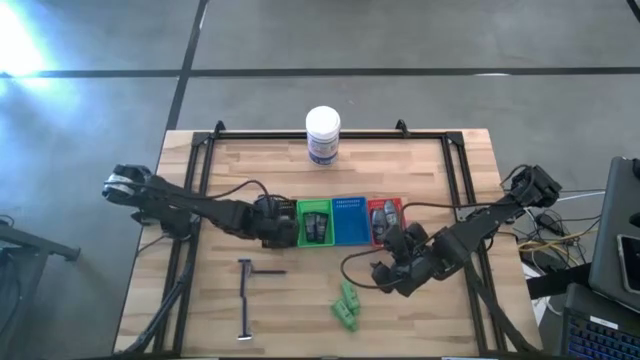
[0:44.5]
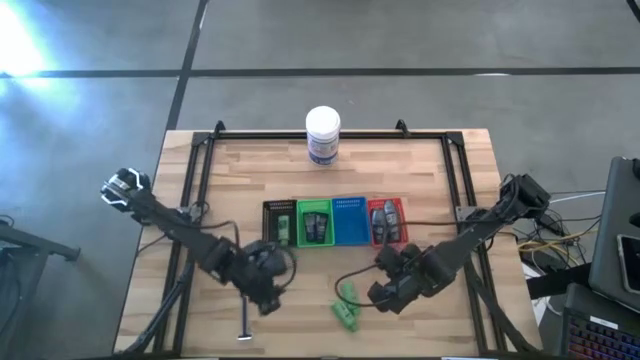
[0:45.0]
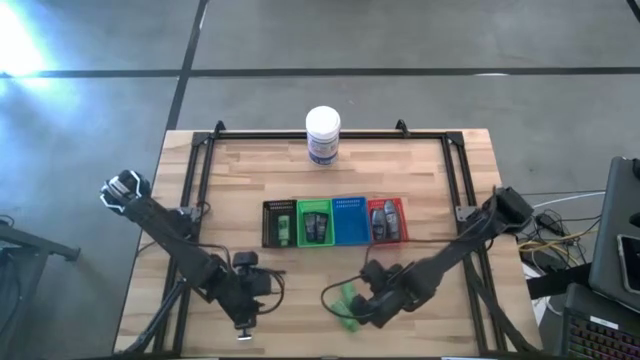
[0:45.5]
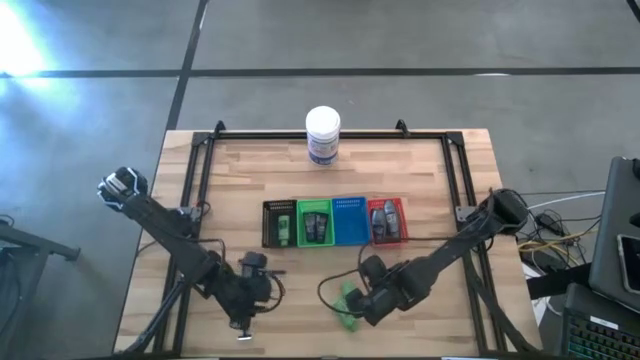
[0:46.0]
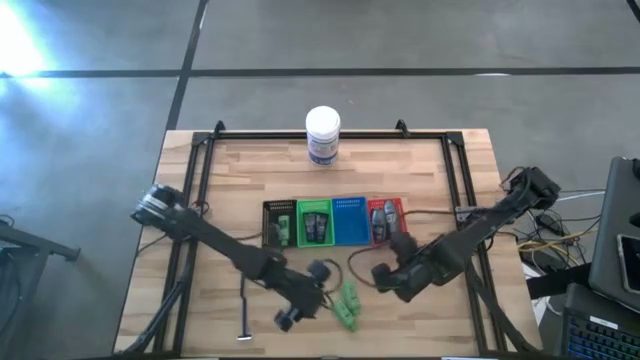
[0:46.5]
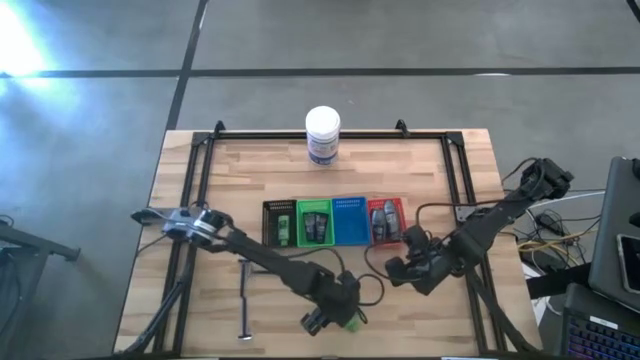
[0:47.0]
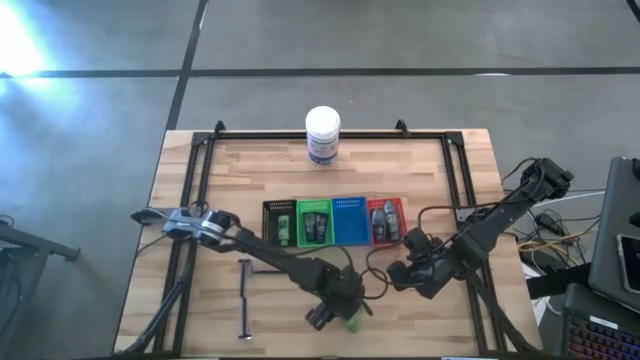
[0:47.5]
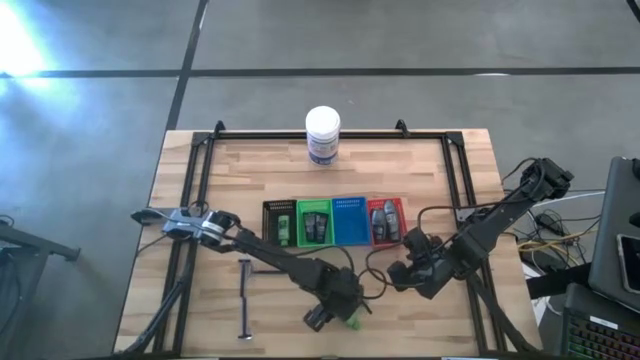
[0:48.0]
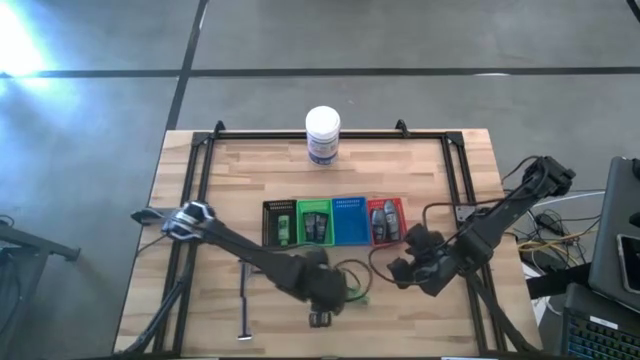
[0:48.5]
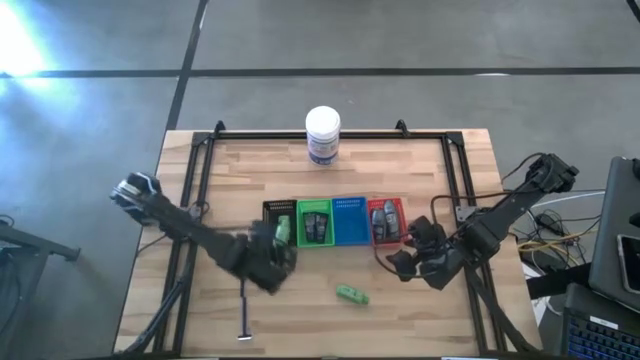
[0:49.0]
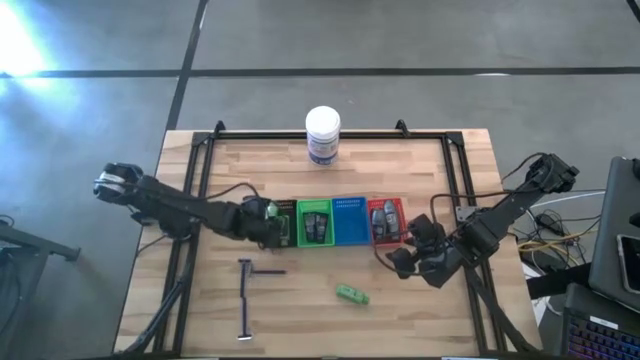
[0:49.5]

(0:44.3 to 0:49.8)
Task: Pick & Place Travel size toiletries
Put the green shampoo in the black bin

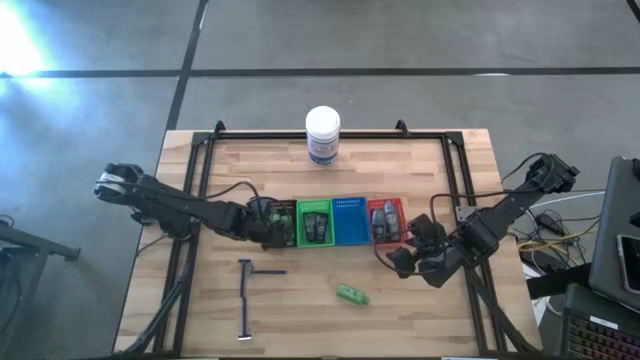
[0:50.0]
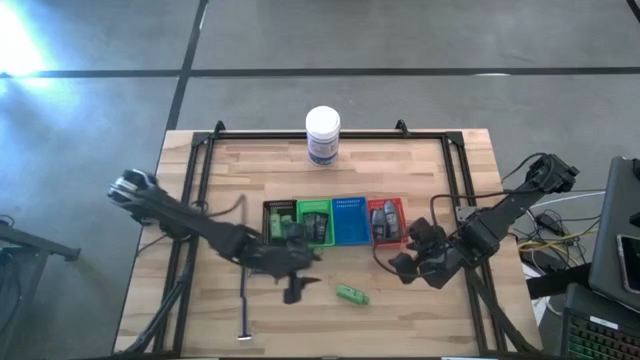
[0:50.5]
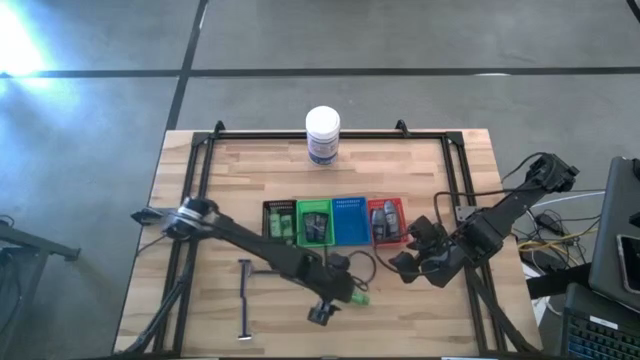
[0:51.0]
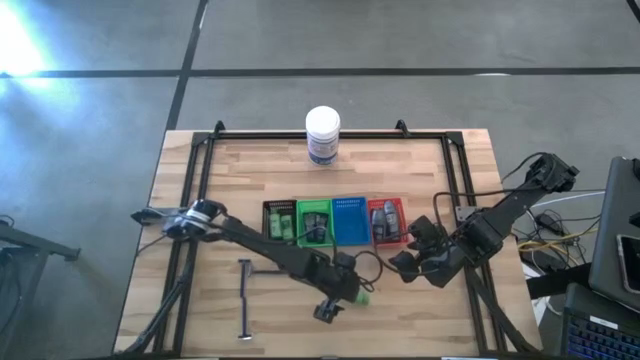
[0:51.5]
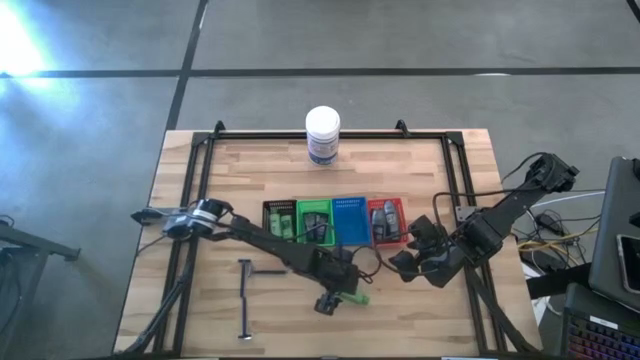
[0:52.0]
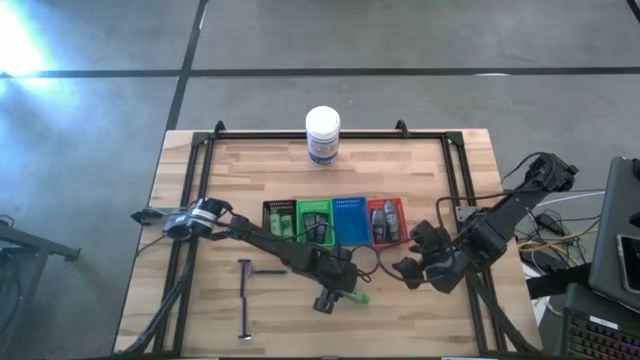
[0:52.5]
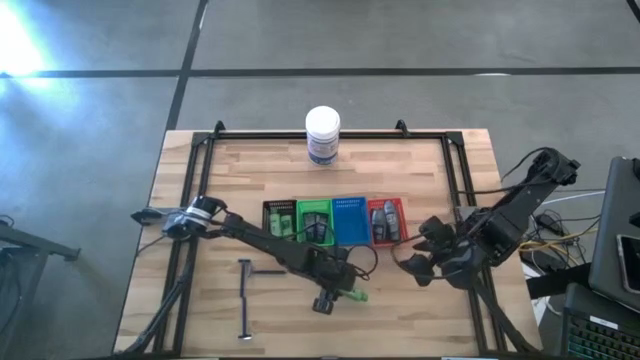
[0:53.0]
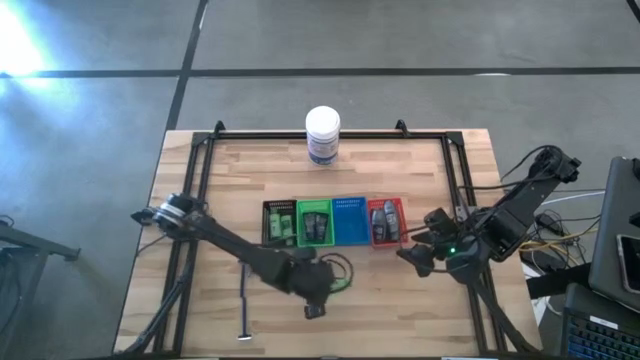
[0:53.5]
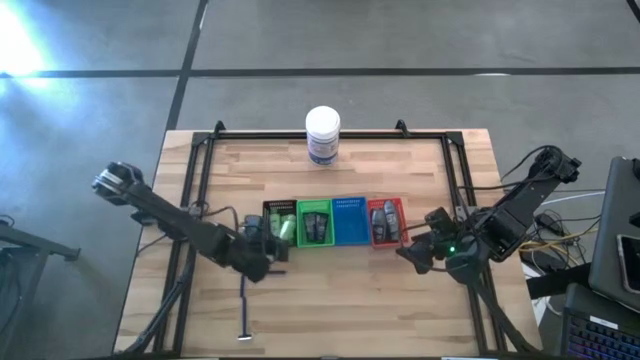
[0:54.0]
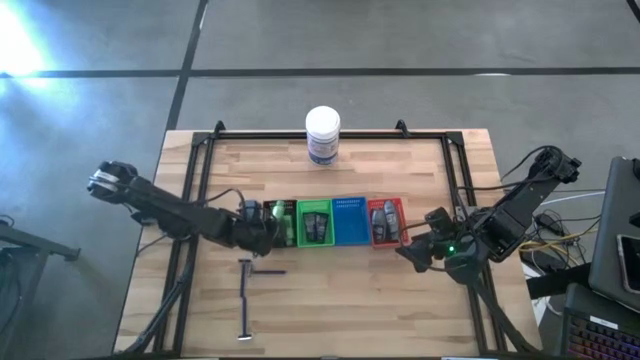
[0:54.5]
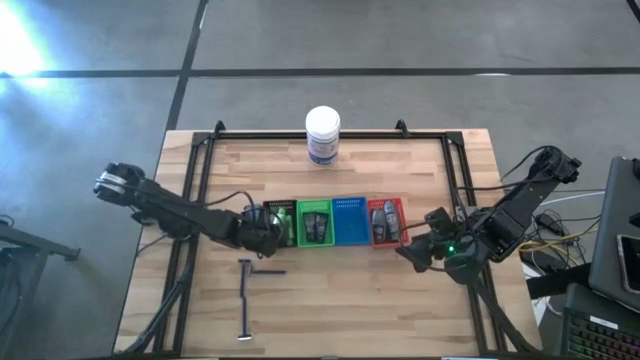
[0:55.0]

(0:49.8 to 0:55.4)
Put the green shampoo in the black bin

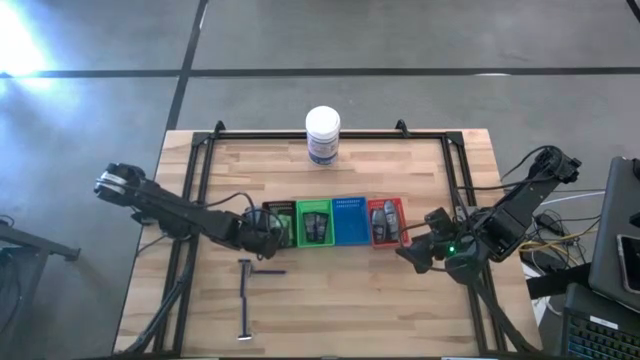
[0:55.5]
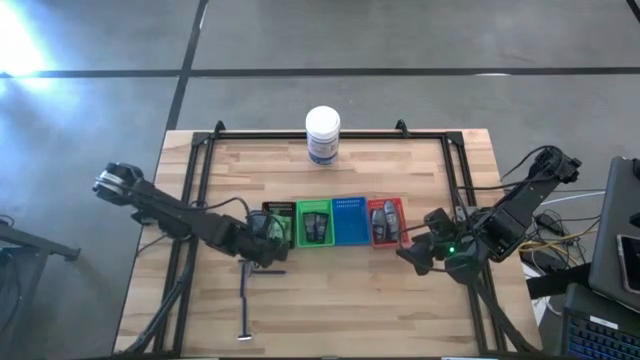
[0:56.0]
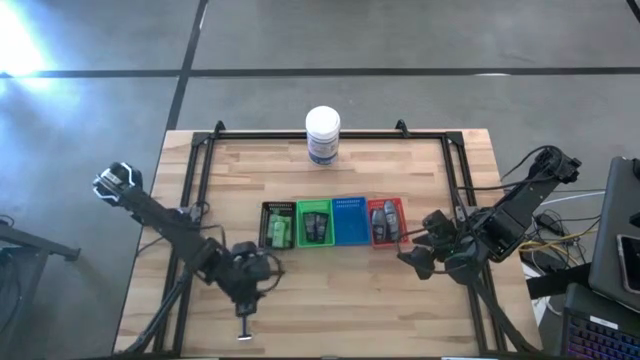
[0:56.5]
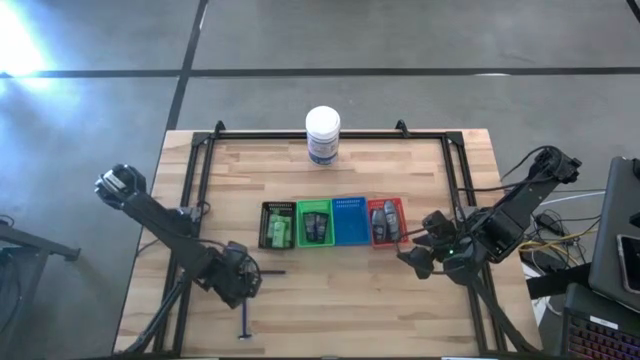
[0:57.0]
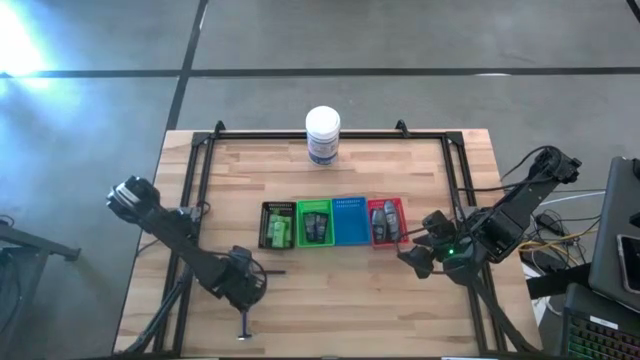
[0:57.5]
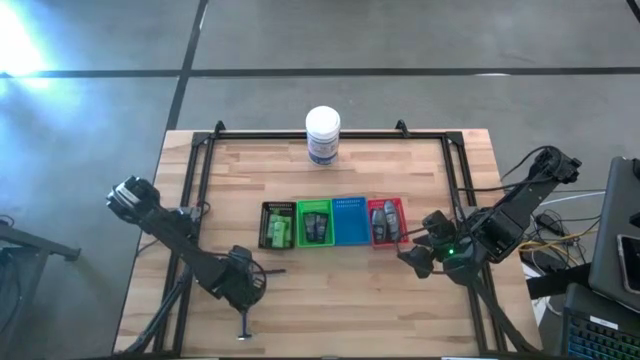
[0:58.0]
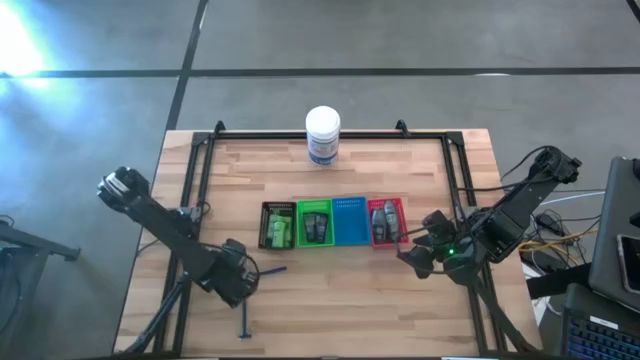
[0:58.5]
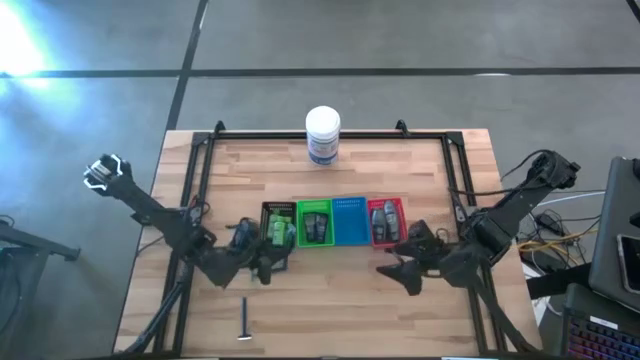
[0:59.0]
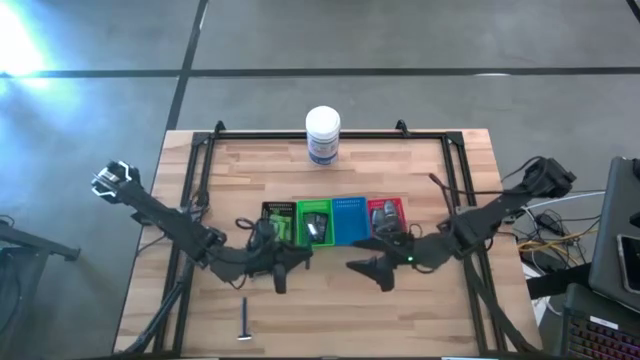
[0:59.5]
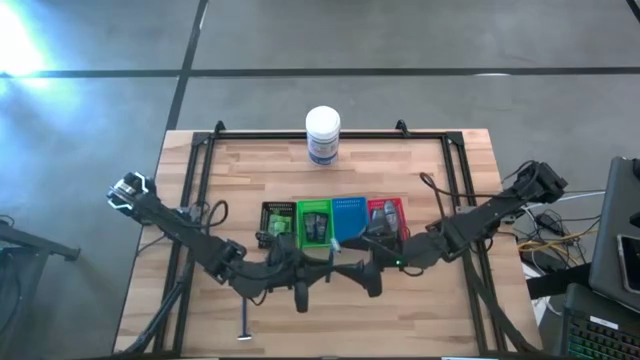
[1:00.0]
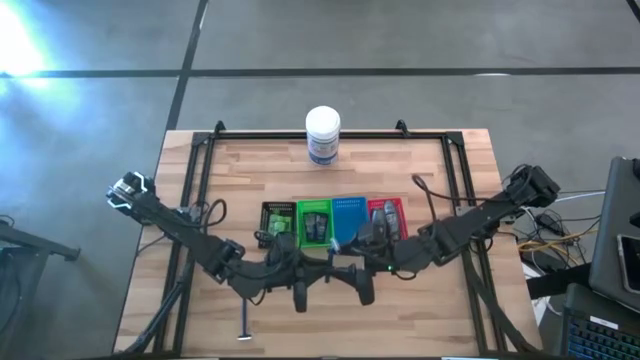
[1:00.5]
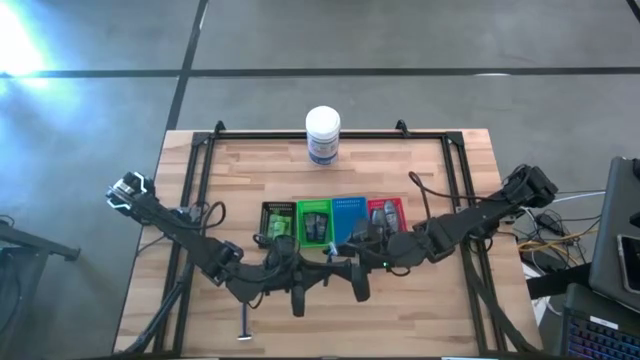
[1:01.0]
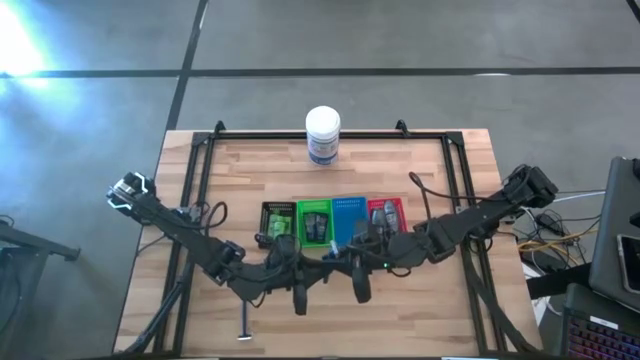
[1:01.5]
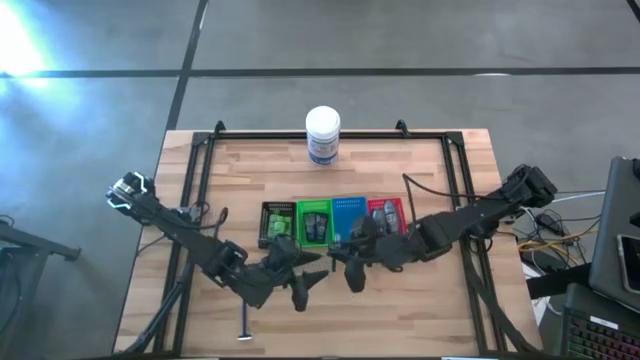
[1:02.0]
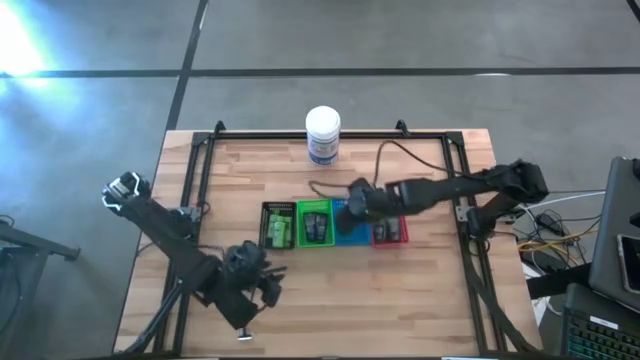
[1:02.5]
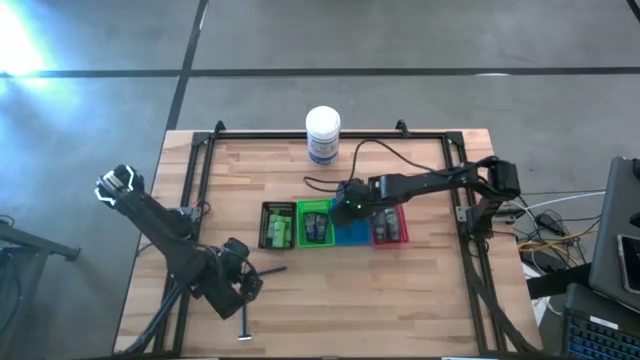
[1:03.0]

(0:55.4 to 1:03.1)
Put the blue razor into the blue bin

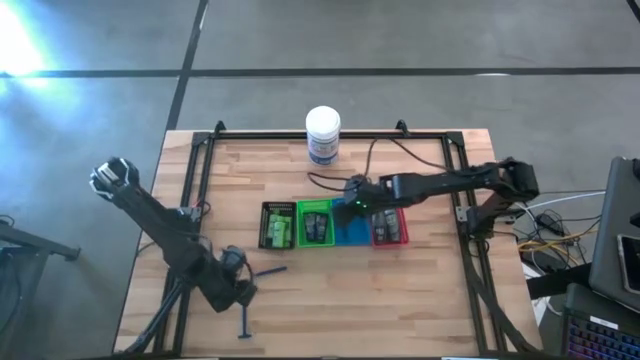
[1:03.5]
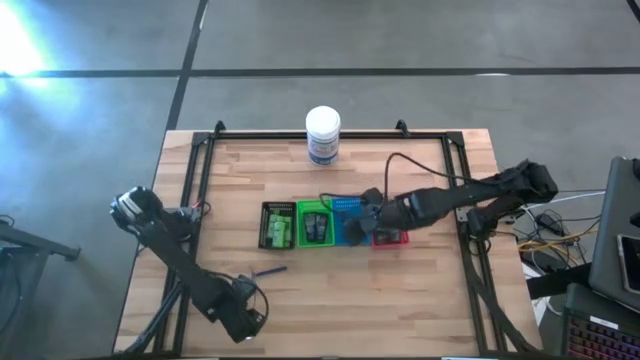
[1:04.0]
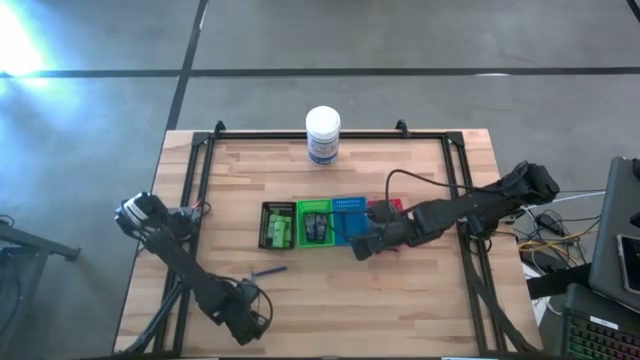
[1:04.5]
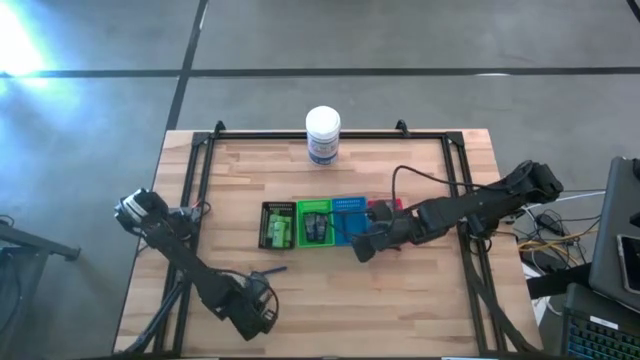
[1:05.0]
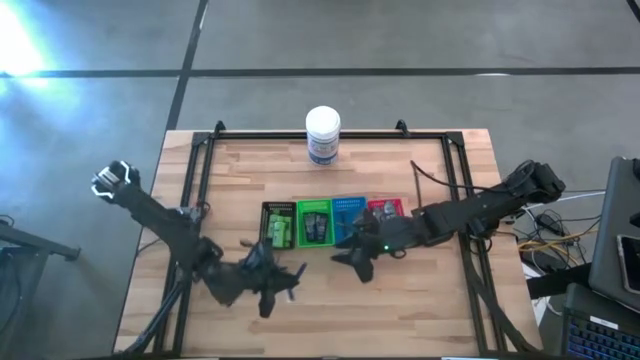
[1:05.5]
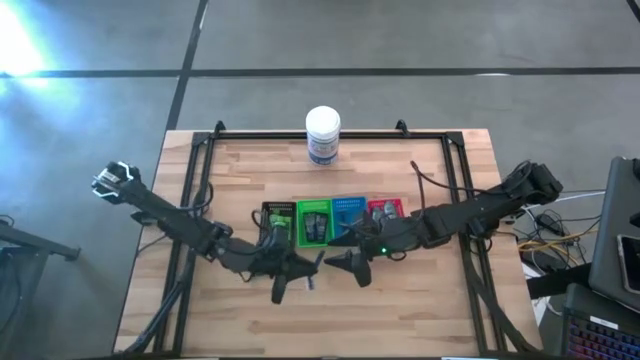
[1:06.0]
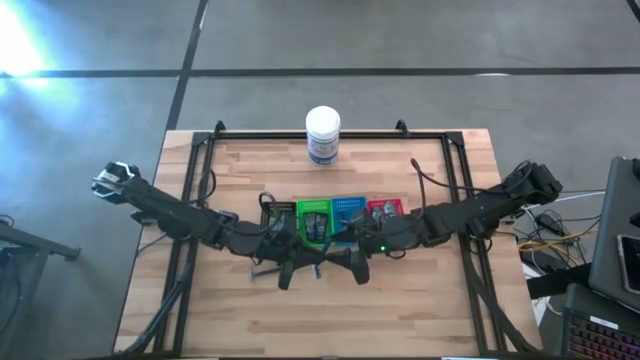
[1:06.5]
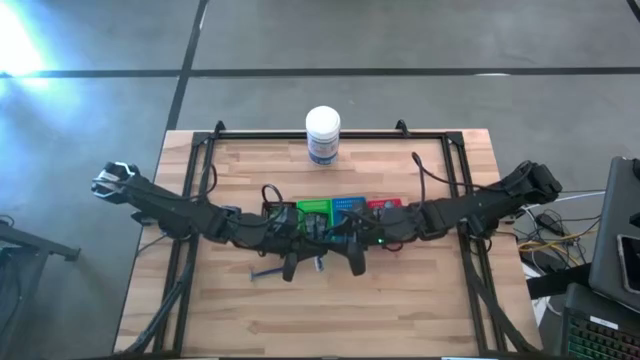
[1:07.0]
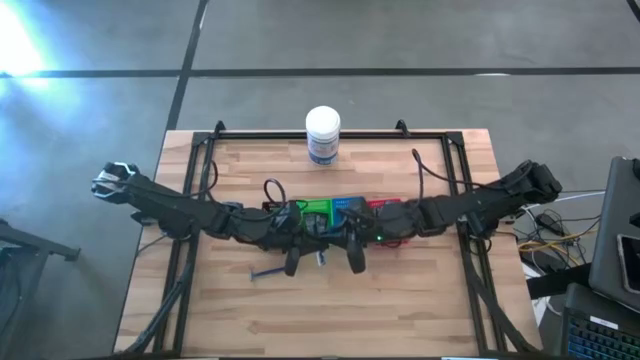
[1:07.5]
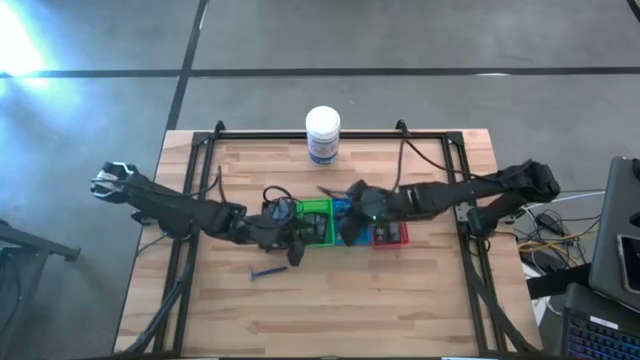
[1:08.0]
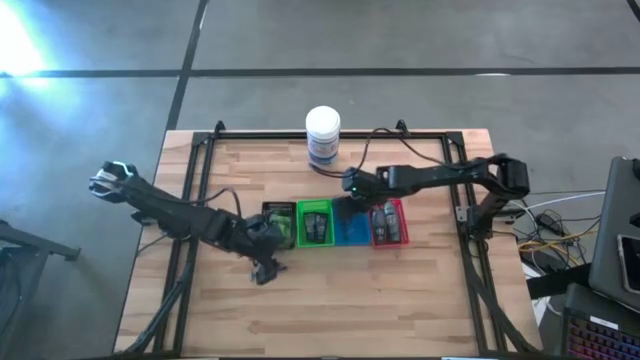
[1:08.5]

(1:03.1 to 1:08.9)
Put the blue razor into the blue bin
